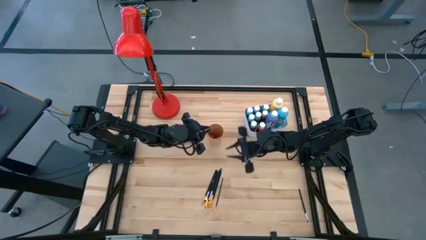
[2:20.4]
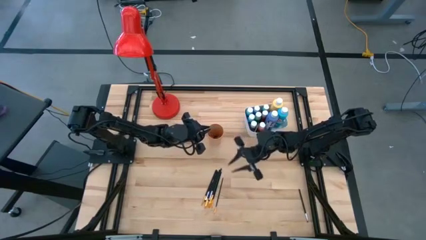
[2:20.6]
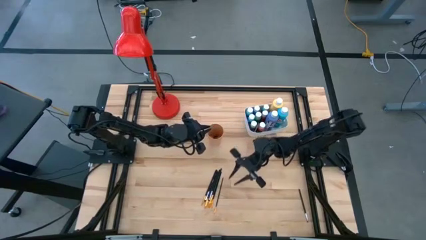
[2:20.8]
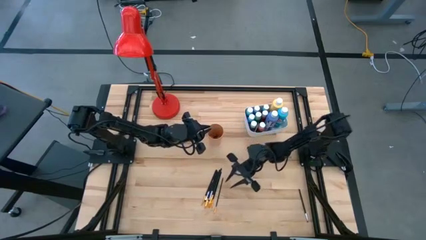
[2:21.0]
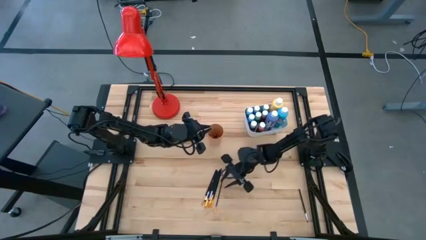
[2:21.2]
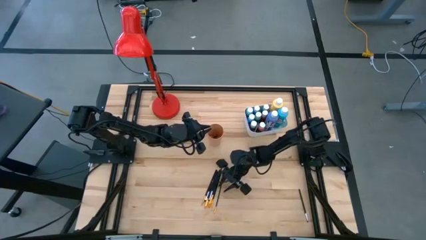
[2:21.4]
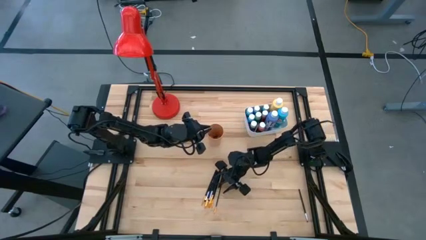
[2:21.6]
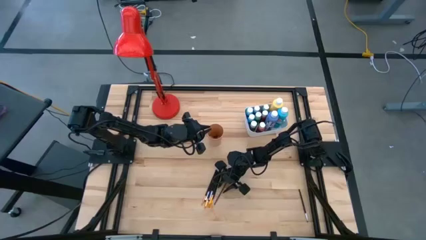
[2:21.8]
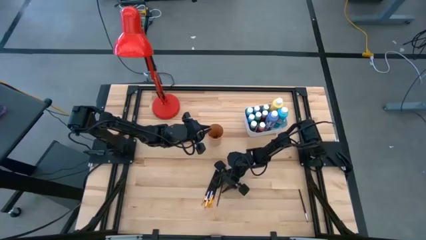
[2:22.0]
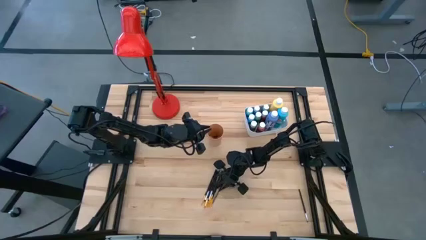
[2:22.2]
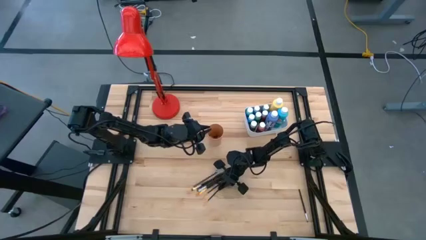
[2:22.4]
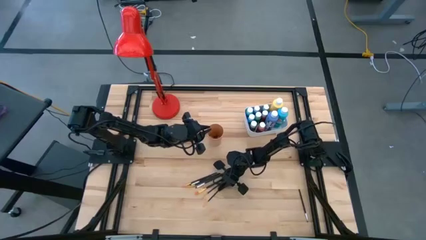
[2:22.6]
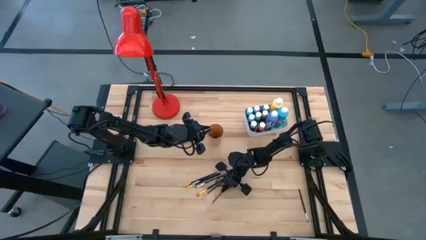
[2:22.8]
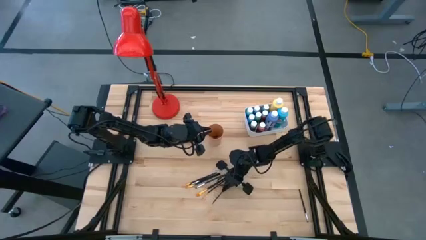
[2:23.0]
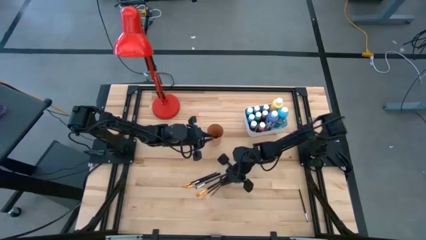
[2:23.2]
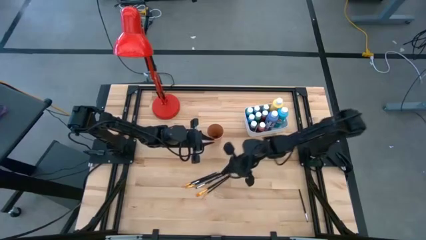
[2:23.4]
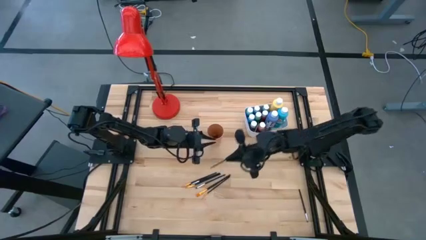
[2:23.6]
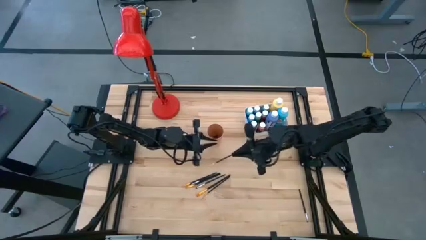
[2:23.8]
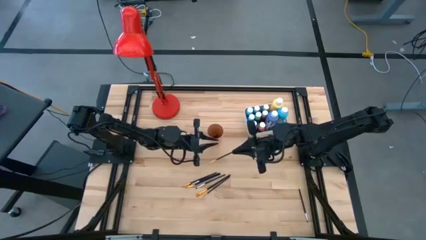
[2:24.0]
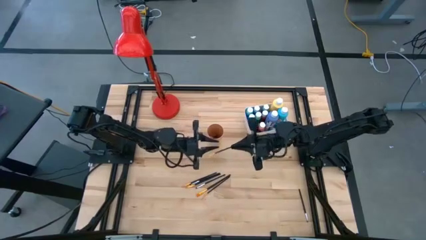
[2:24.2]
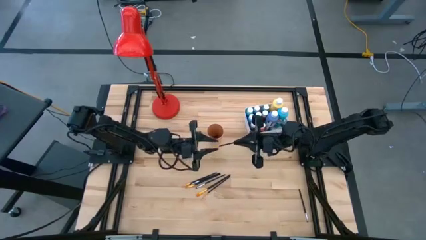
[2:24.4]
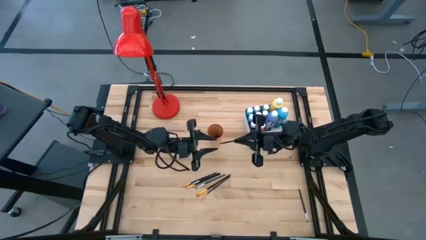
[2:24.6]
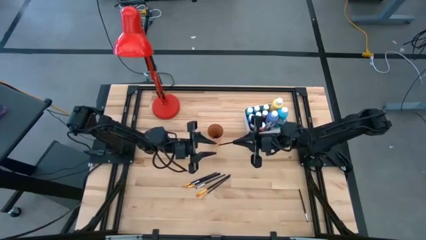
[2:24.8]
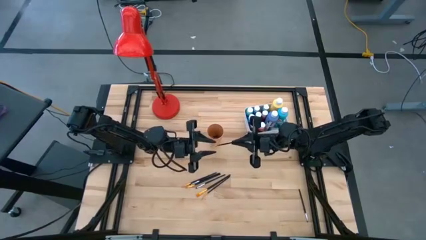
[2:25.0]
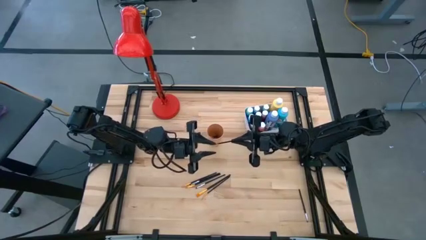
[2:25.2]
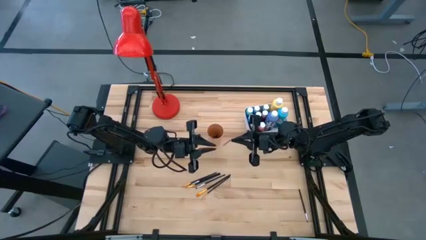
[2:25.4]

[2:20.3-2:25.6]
Task: Pick & Place Paint Supplies
Put the orange paint brush into the orange cup

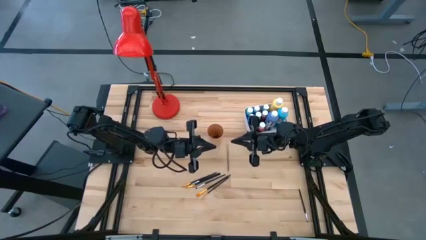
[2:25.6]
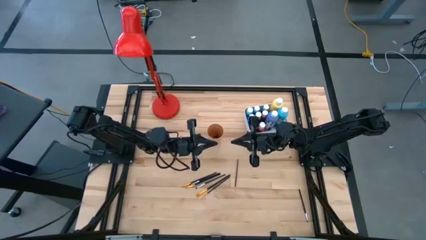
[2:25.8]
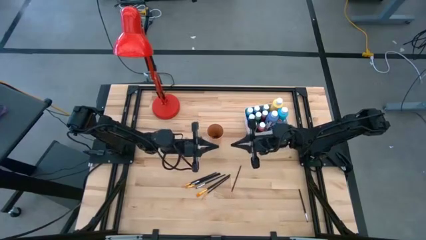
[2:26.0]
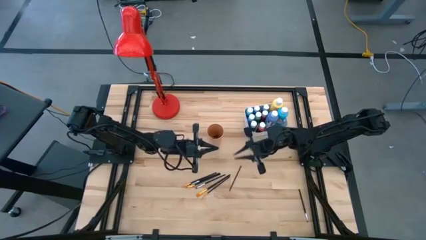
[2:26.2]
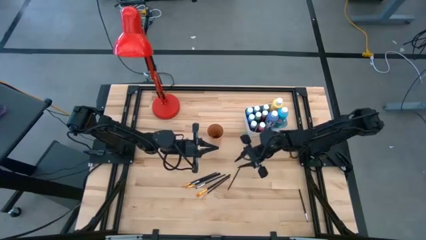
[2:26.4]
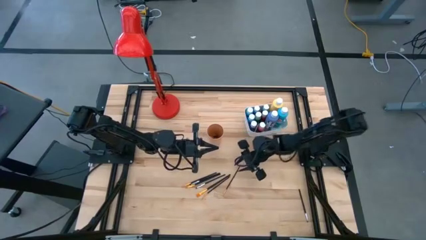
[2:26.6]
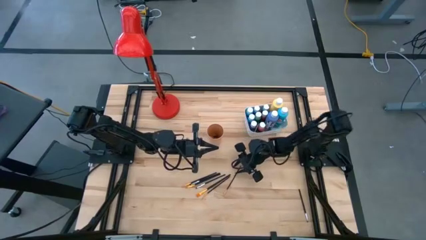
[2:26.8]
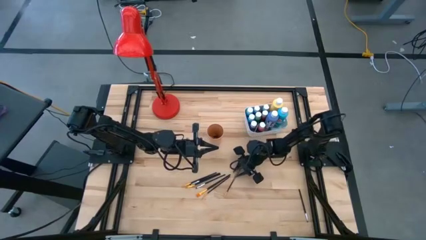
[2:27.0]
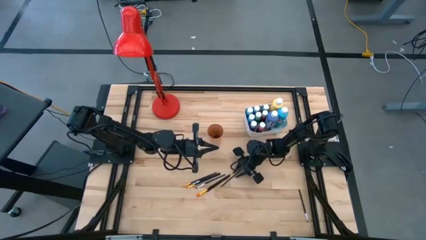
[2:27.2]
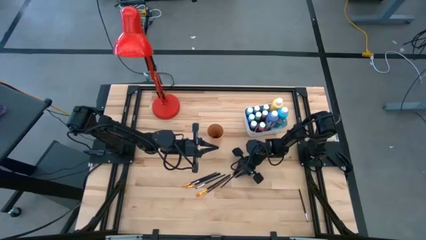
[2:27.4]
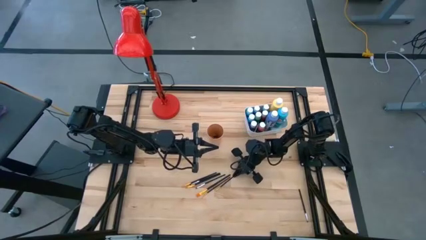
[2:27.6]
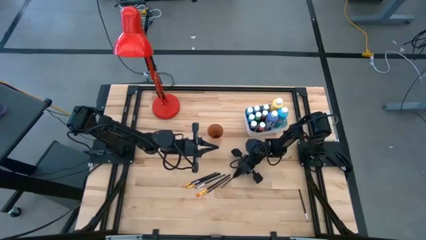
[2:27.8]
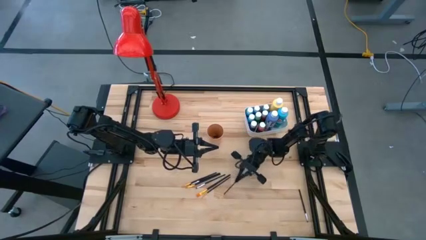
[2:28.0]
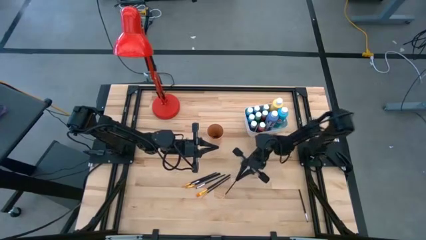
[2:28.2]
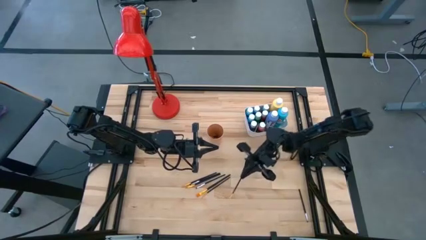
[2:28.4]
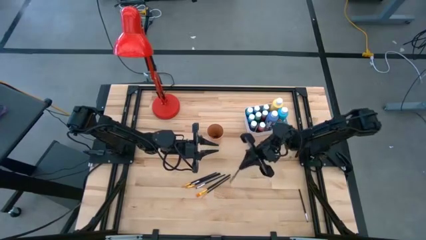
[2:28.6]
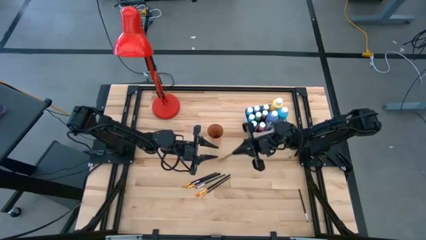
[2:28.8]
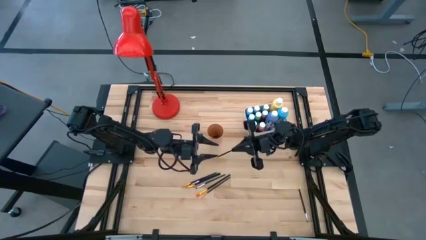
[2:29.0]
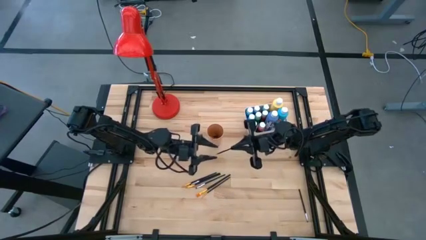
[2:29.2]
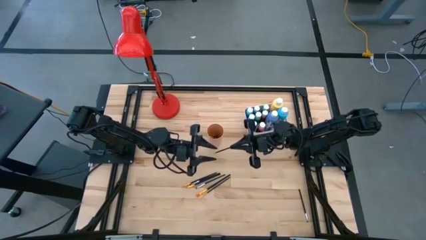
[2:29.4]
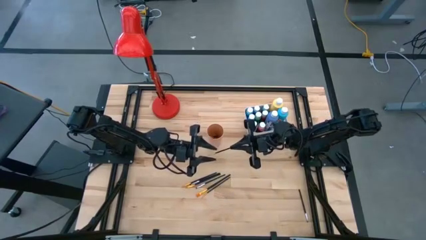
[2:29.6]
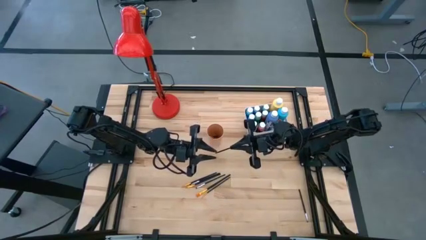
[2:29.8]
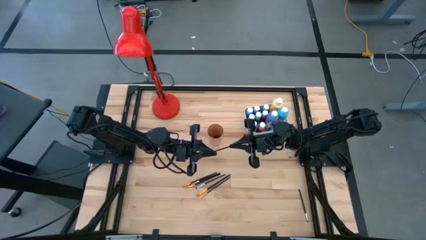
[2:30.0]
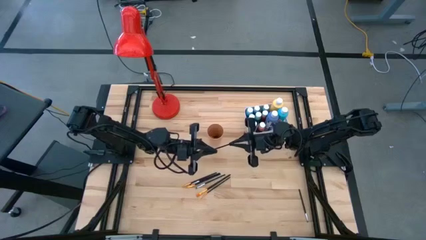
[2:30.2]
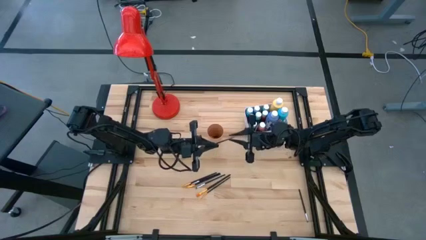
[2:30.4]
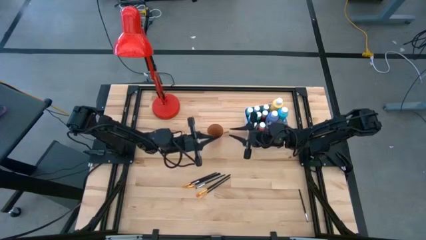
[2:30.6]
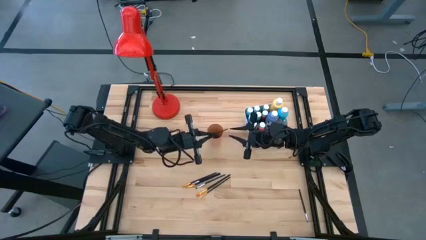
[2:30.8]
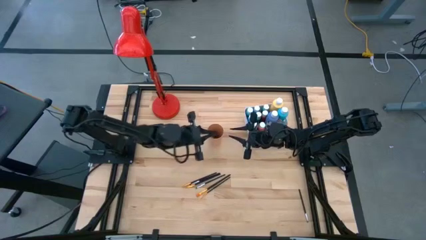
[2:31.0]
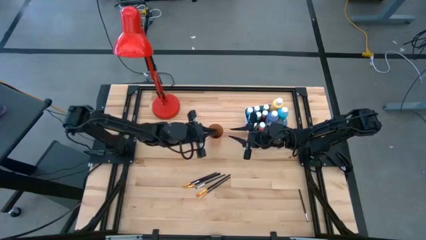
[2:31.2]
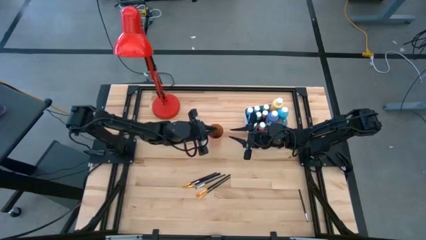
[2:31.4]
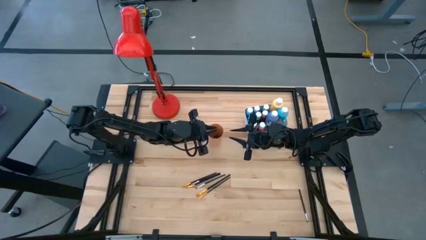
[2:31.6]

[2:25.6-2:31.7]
Put the orange paint brush into the orange cup

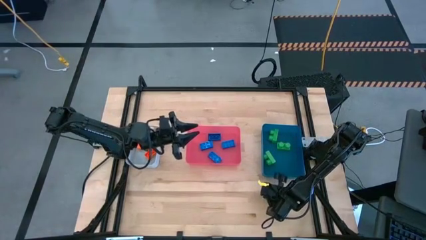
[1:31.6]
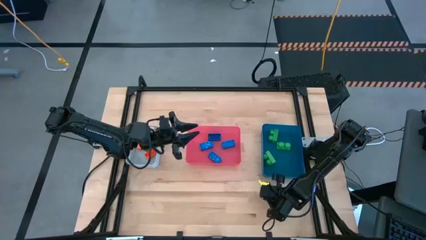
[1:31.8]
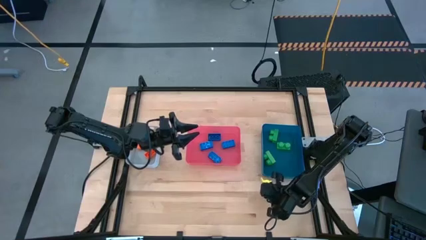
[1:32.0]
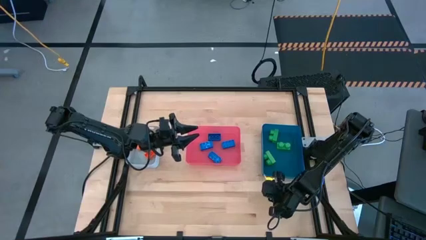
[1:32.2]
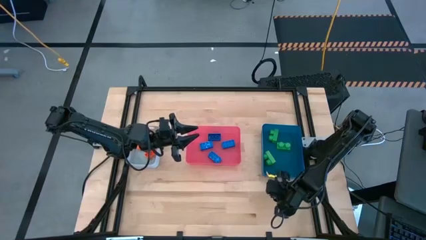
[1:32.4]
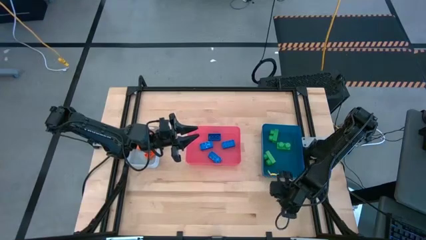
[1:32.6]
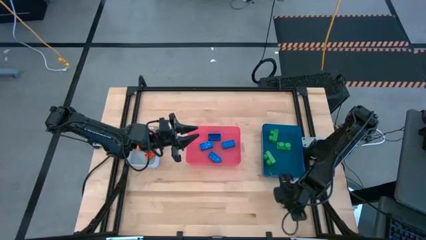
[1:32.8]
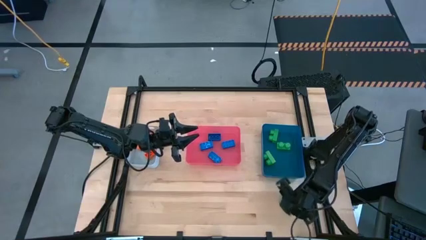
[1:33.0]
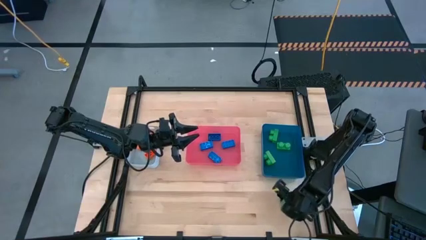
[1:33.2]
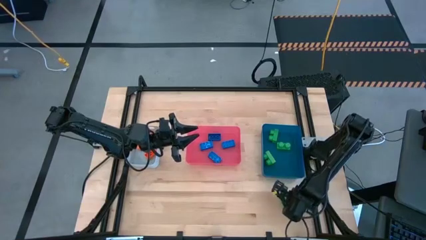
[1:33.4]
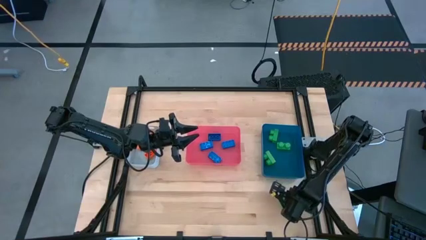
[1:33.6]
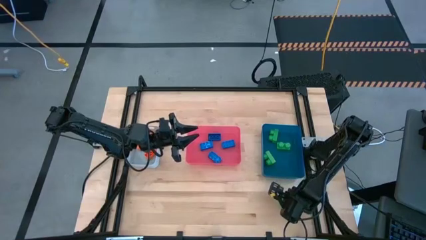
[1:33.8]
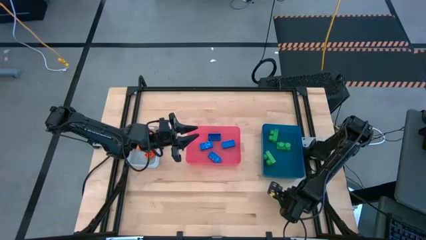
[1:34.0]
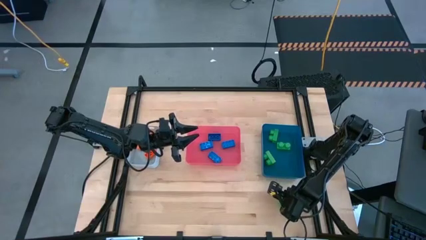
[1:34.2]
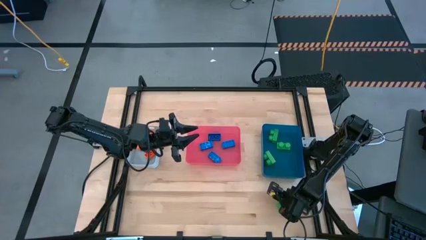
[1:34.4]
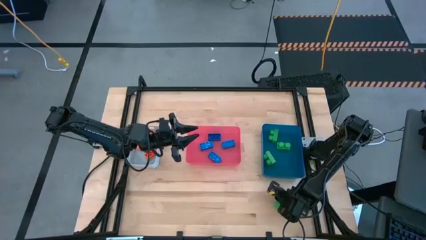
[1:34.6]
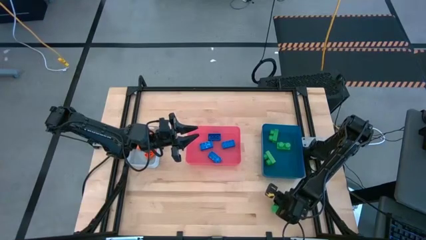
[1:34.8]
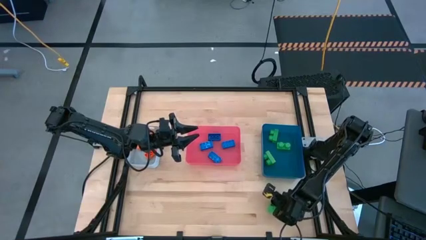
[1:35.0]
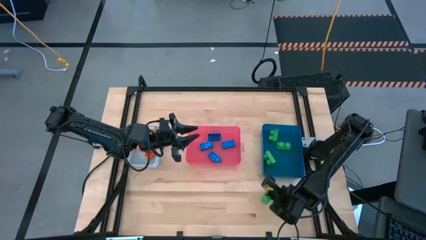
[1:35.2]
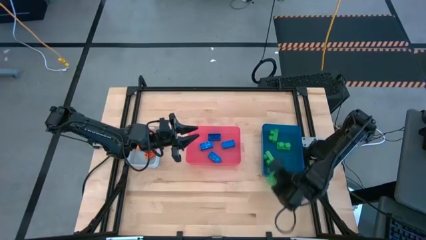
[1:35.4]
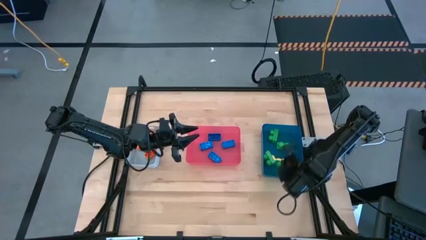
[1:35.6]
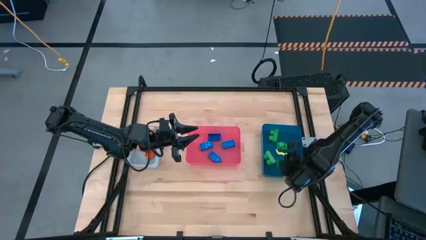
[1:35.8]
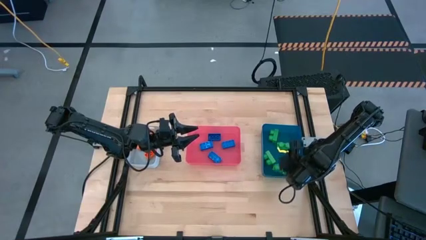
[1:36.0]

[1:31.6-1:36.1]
Task: Sort & place blocks by color
Put the green game piece into the blue bin
